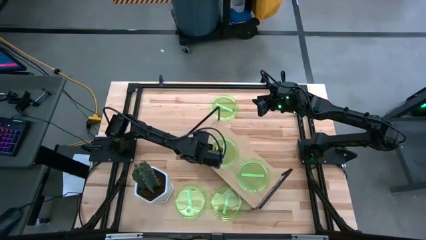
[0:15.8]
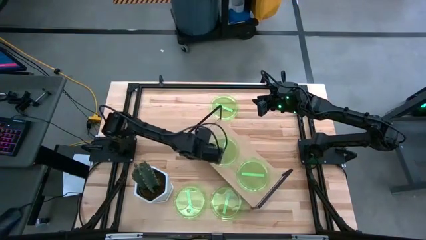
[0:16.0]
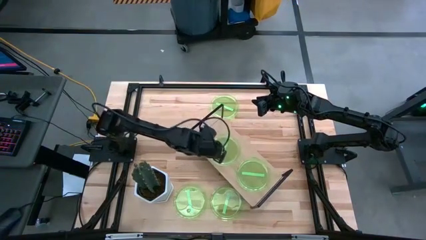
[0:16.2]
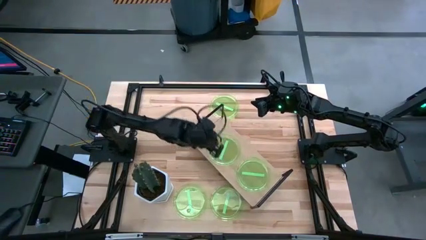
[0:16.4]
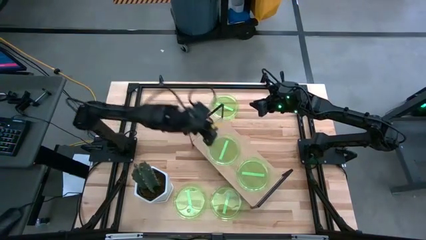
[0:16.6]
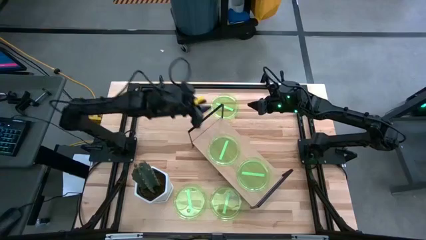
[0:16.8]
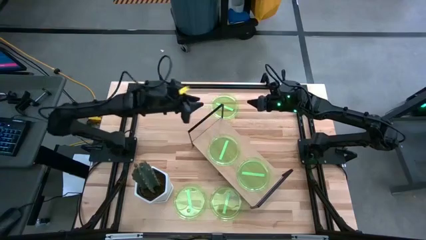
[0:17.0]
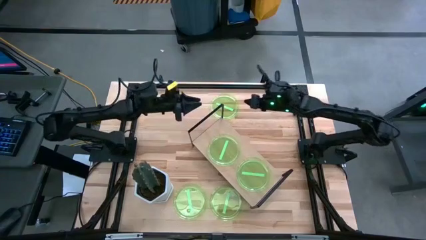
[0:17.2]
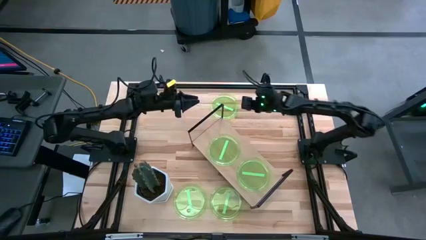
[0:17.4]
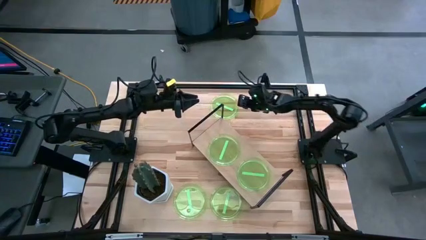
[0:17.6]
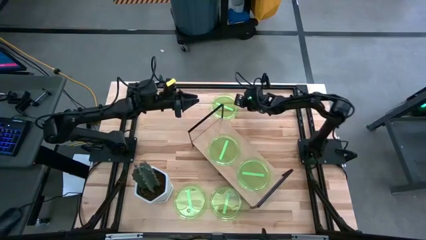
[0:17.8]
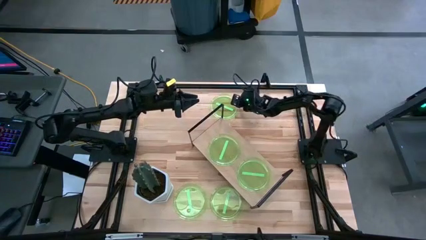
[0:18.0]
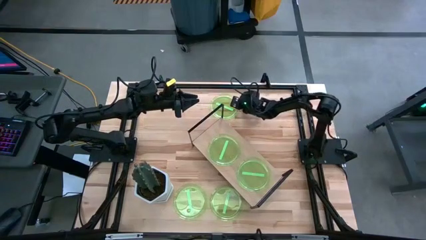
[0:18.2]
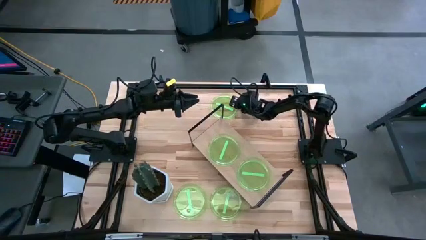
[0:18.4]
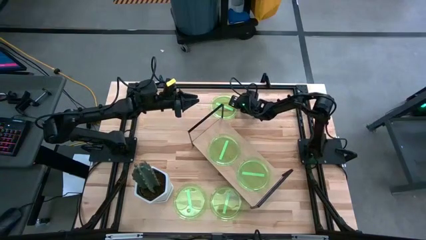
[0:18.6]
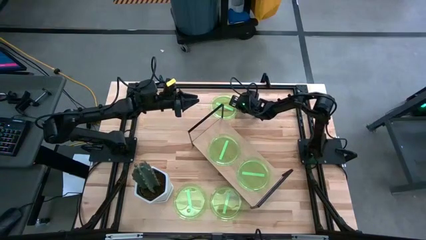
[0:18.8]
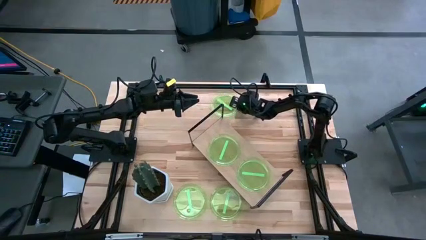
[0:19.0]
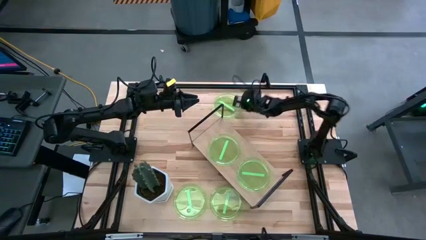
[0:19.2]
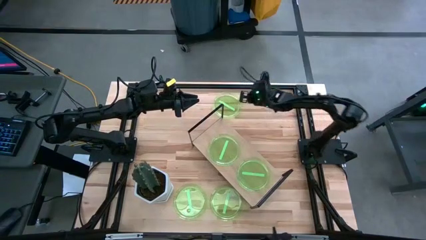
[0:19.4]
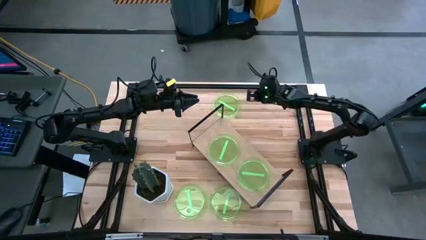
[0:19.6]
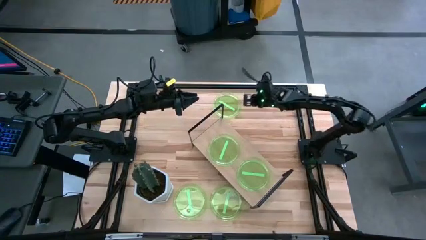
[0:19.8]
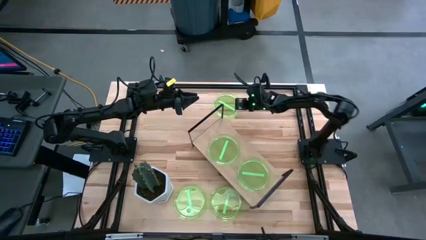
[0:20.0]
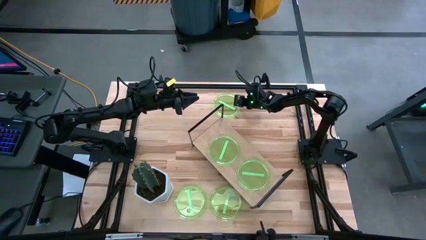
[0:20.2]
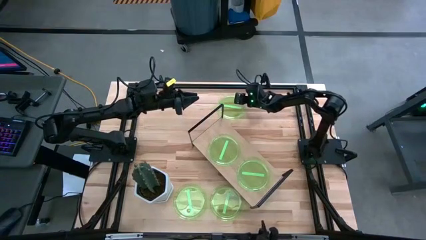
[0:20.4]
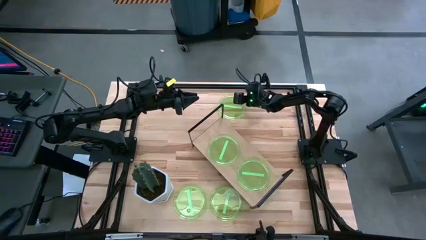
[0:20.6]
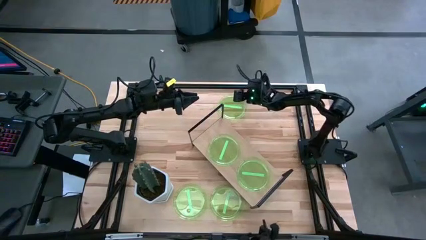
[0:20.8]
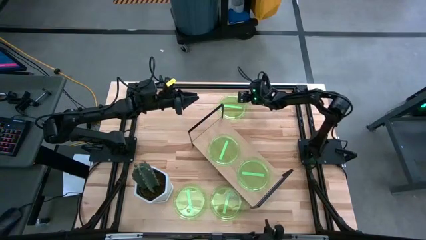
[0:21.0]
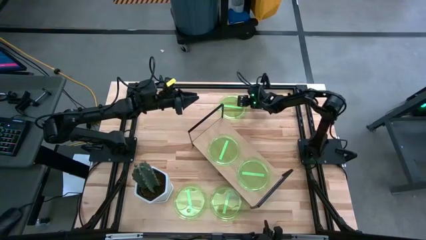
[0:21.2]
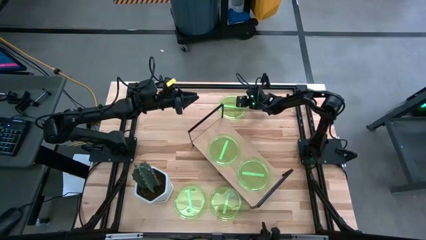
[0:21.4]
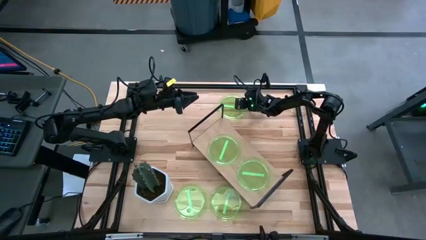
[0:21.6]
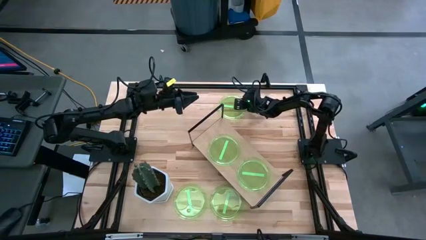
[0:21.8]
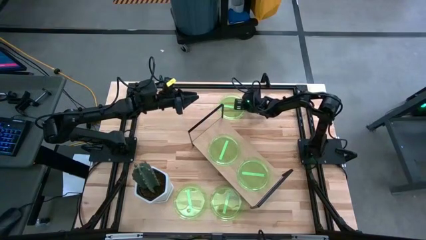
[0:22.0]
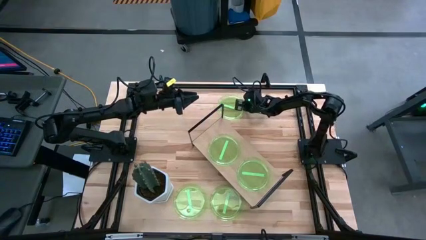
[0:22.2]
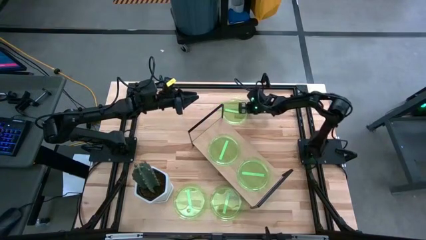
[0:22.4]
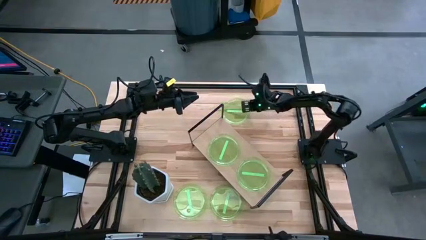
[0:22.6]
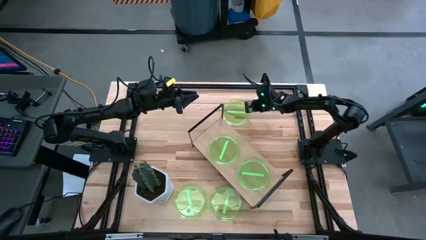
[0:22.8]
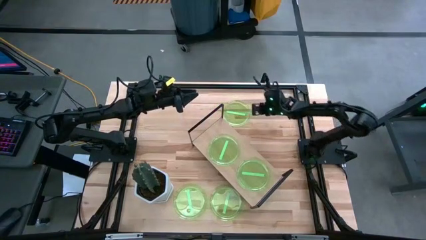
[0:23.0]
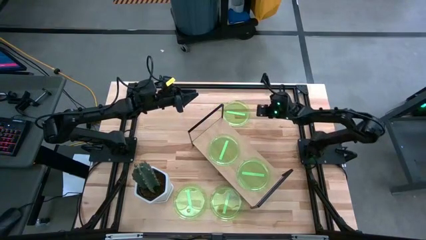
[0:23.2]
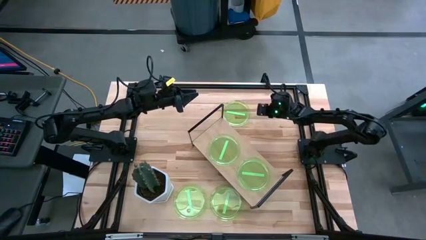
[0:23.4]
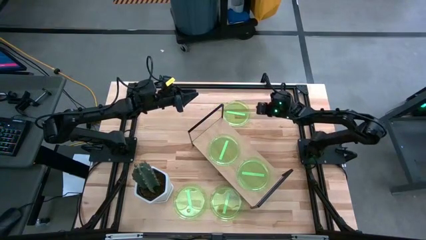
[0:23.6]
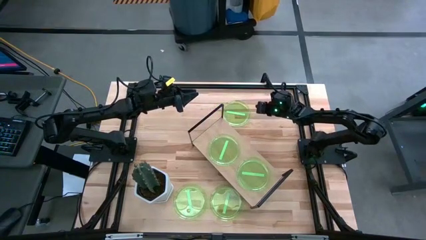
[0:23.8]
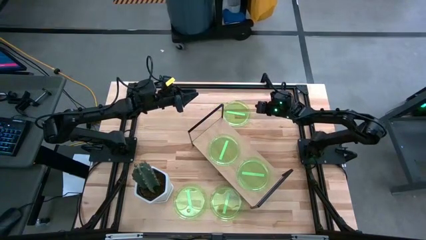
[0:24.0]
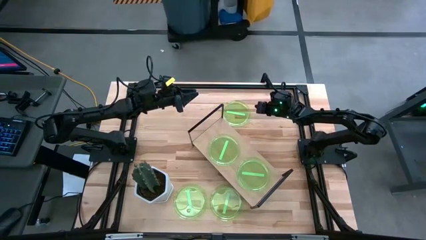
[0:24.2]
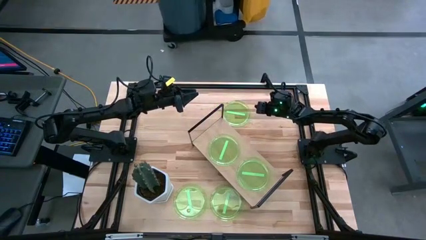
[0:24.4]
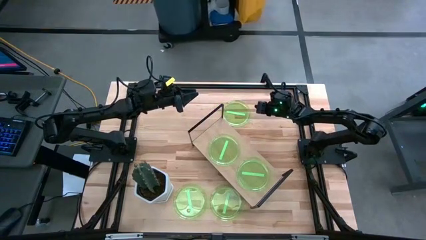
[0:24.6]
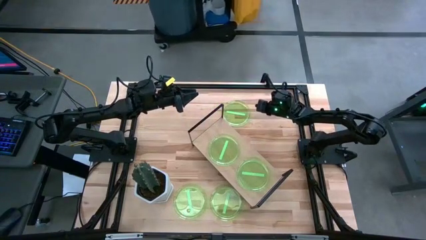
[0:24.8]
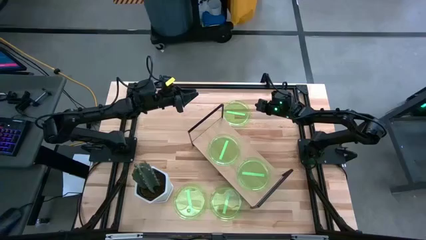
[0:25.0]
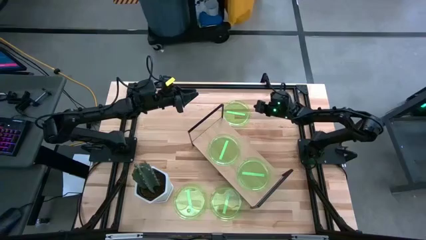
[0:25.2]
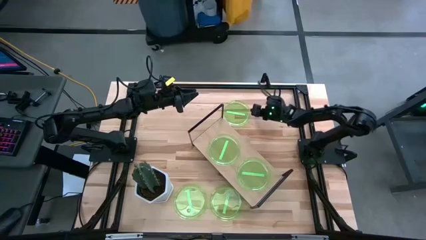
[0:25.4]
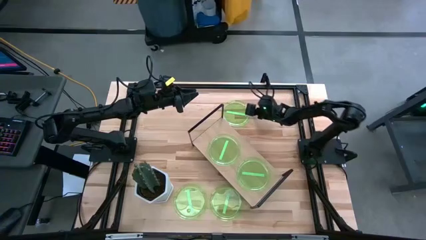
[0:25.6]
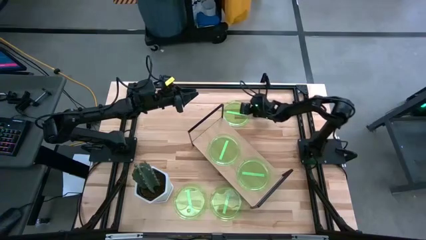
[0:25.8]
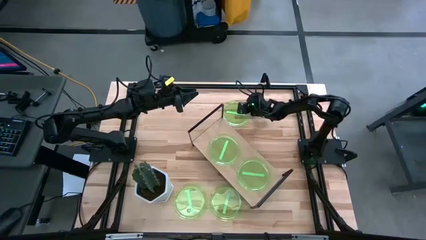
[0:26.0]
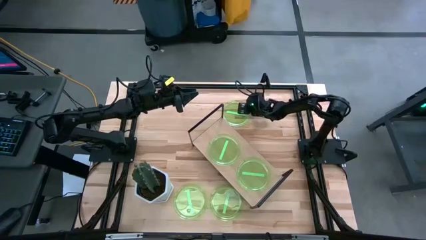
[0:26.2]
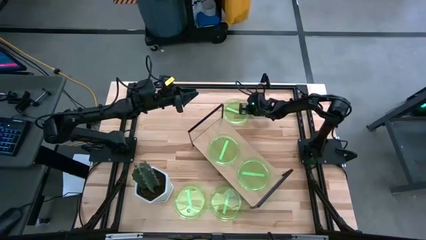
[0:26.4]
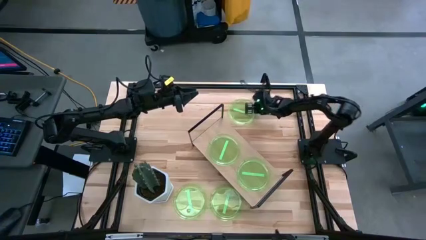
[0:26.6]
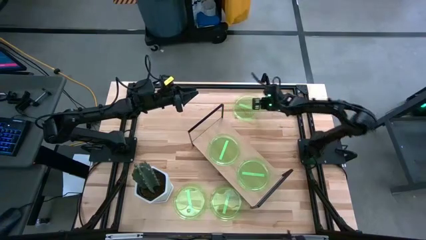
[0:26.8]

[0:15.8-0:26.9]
Task: Place and stack plates onto a shelf
Stack the top center transparent green plate on top of the left transparent green plate on the shelf

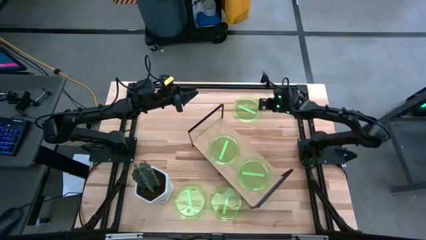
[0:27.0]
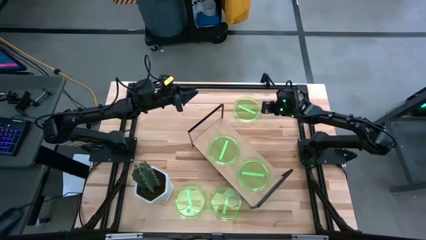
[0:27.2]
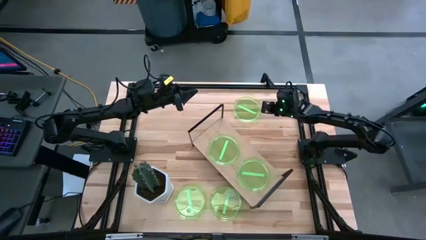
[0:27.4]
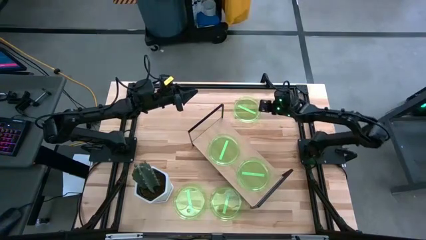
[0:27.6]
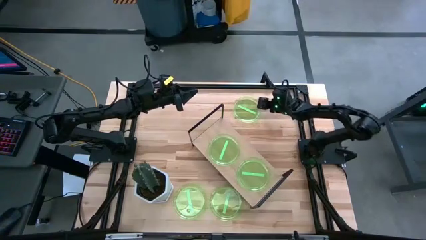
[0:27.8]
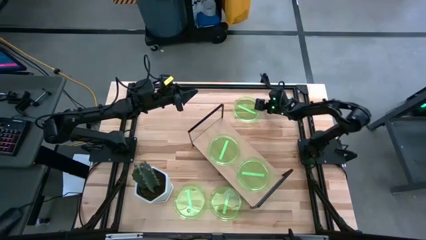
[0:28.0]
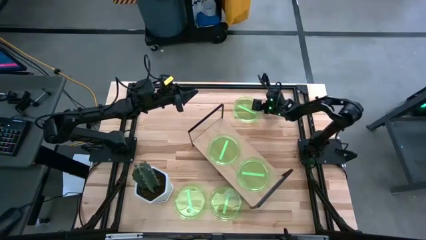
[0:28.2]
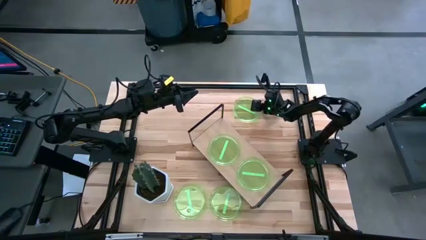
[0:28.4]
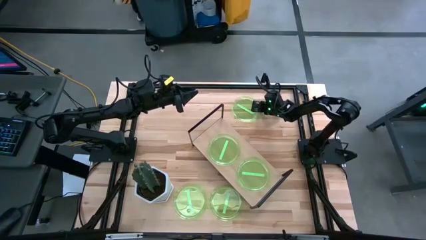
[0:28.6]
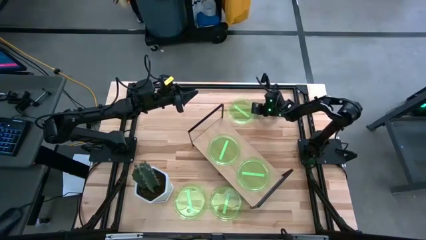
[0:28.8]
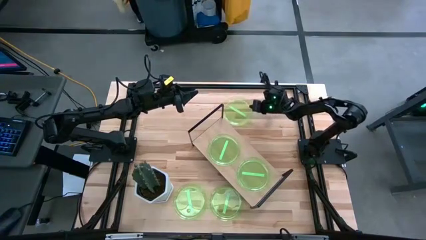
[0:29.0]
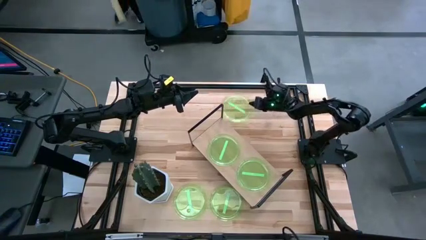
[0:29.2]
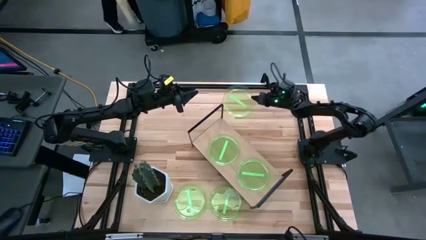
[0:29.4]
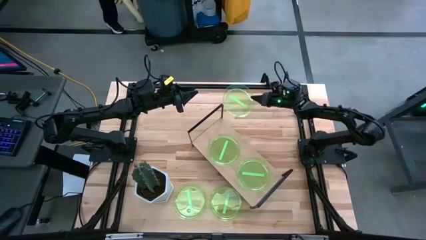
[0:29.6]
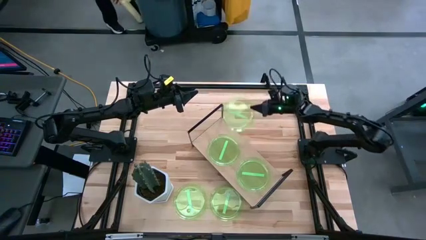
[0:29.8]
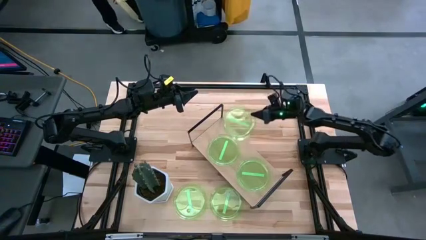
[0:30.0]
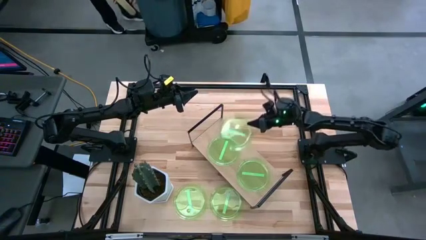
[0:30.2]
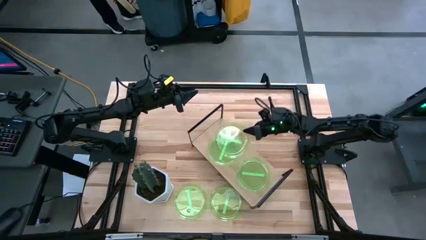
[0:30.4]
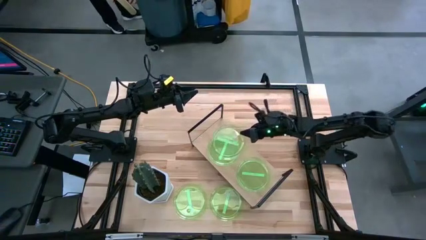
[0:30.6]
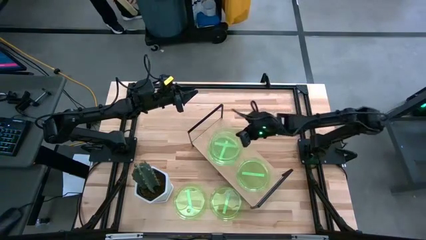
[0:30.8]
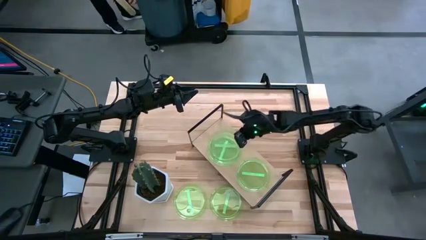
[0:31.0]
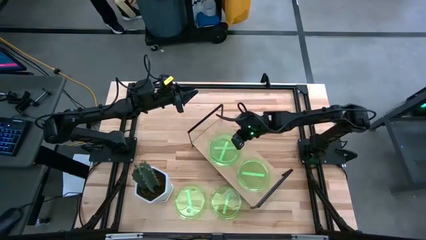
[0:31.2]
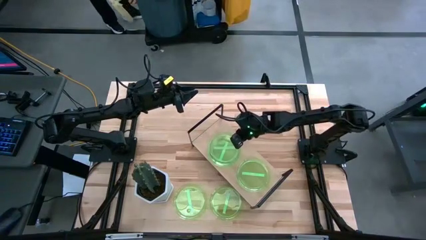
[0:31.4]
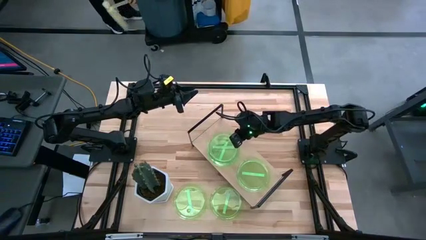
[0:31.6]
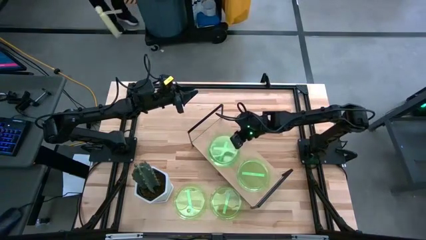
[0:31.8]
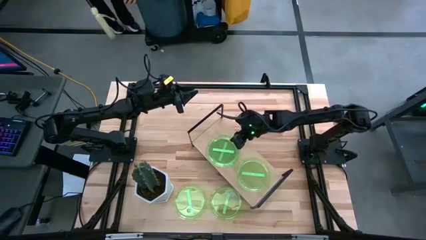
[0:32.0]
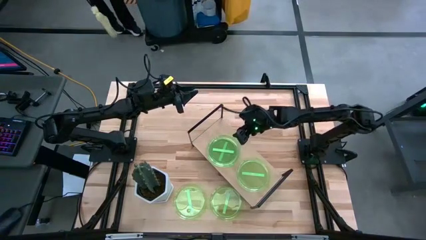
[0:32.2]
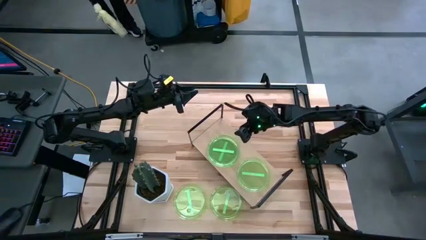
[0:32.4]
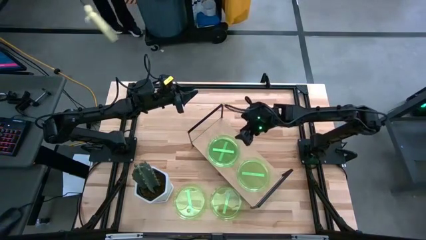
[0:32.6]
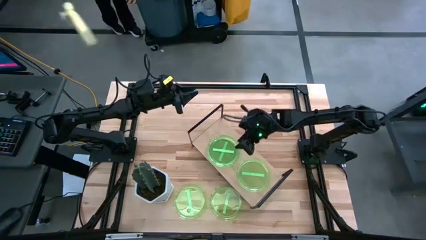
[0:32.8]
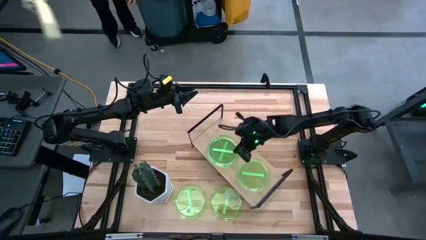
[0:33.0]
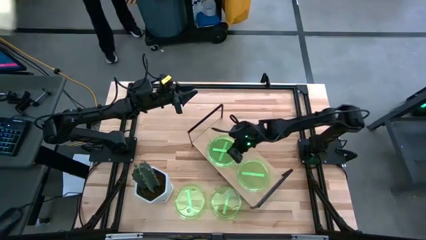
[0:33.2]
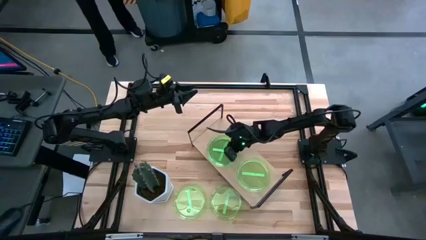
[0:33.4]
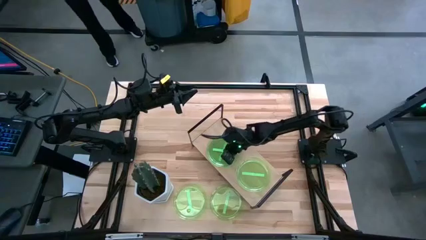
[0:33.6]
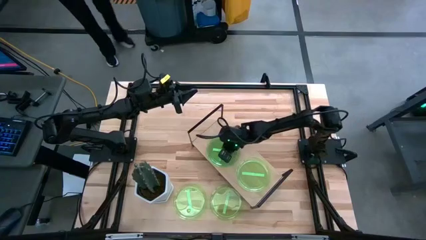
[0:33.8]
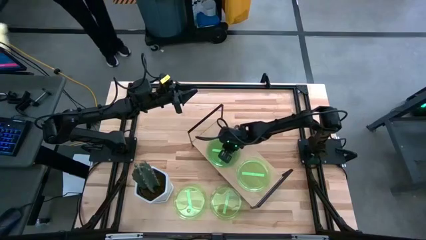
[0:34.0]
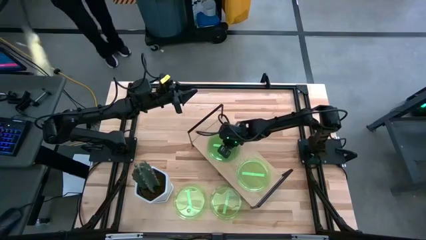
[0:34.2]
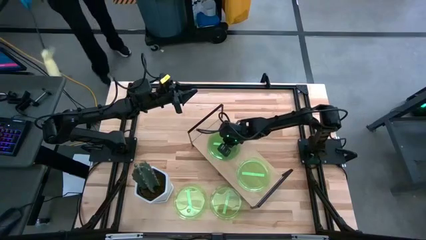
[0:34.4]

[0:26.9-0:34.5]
Stack the top center transparent green plate on top of the left transparent green plate on the shelf
